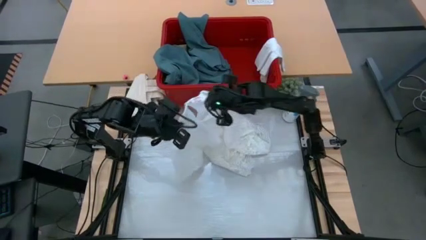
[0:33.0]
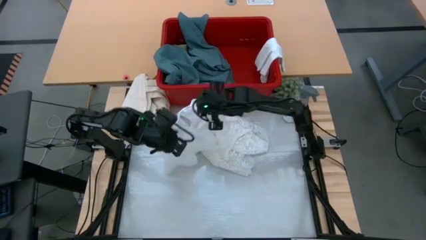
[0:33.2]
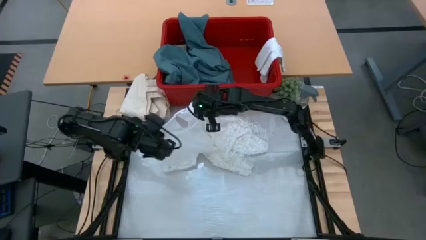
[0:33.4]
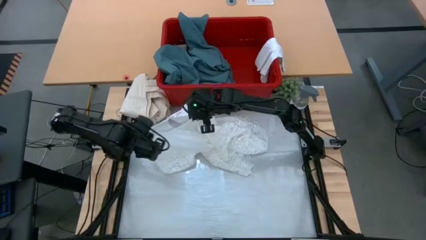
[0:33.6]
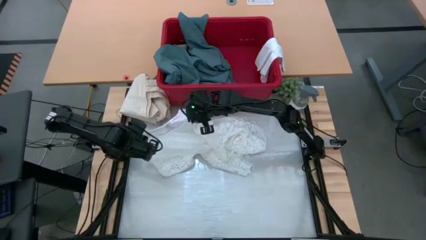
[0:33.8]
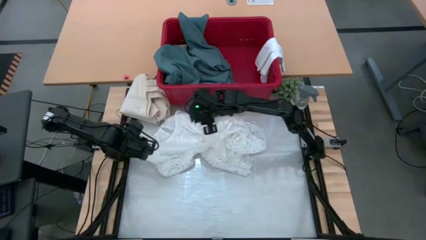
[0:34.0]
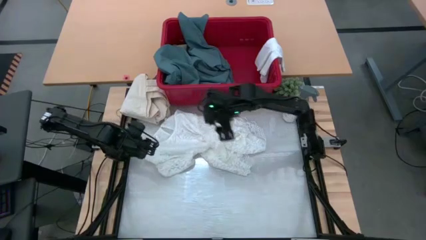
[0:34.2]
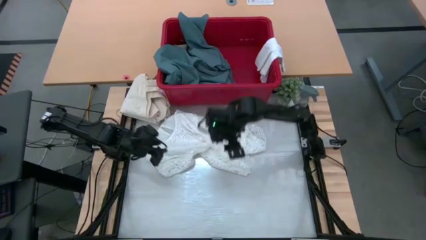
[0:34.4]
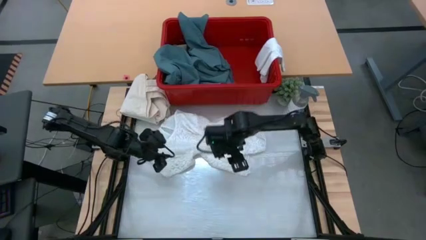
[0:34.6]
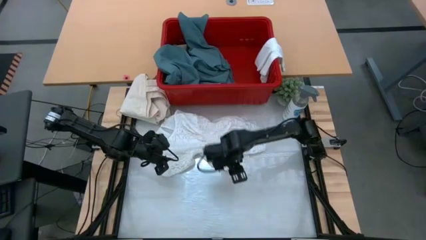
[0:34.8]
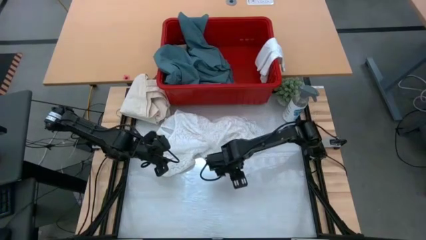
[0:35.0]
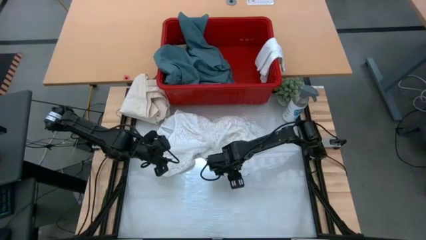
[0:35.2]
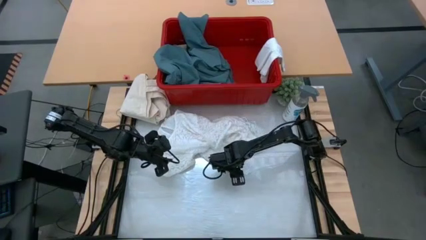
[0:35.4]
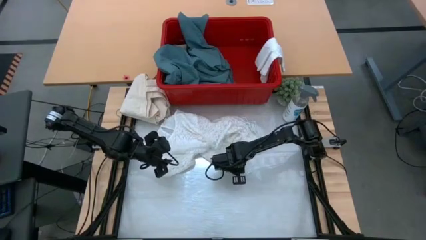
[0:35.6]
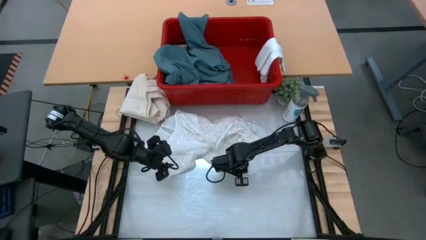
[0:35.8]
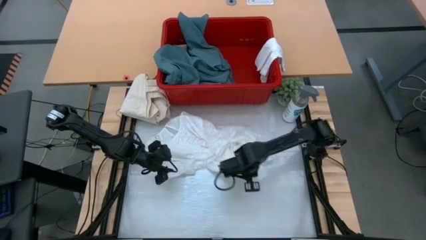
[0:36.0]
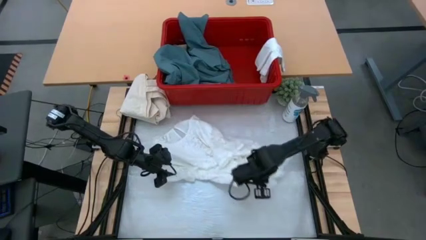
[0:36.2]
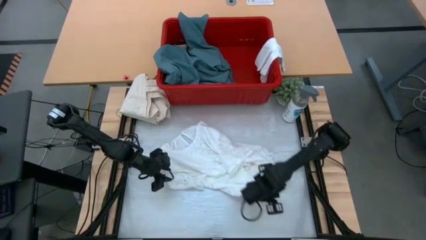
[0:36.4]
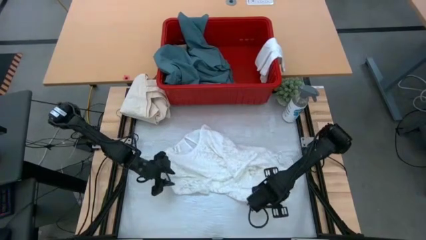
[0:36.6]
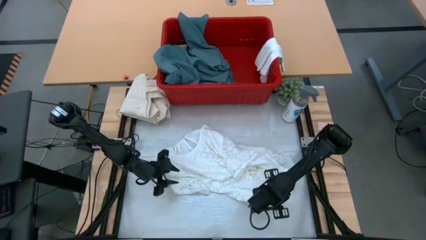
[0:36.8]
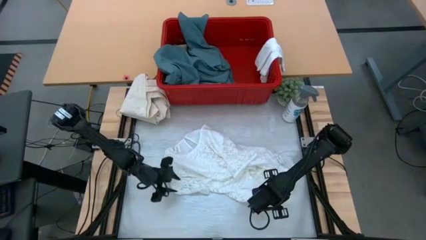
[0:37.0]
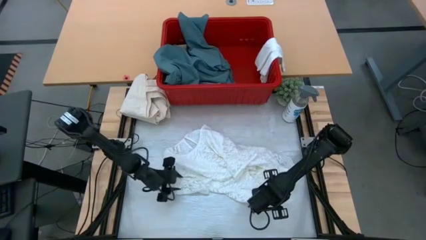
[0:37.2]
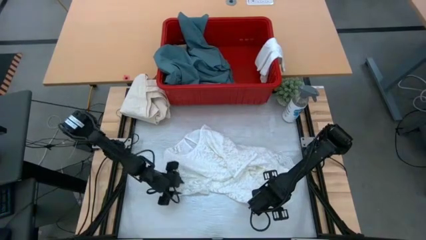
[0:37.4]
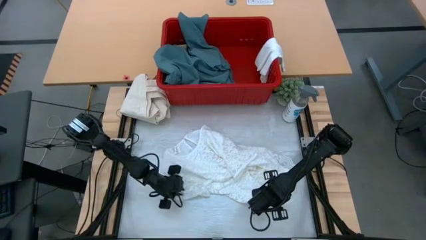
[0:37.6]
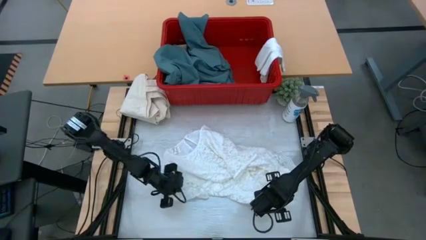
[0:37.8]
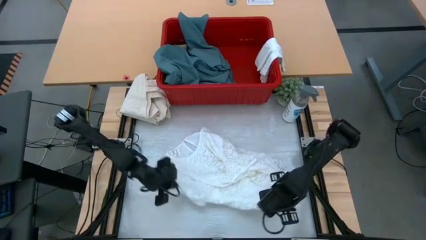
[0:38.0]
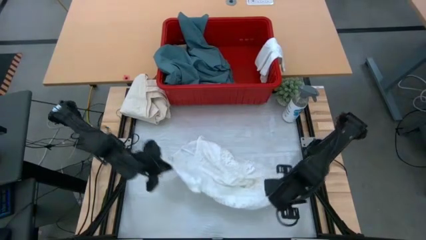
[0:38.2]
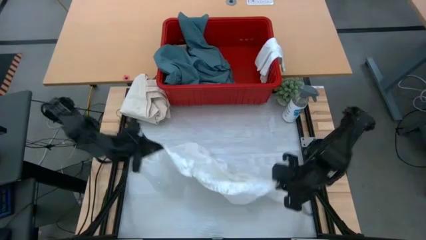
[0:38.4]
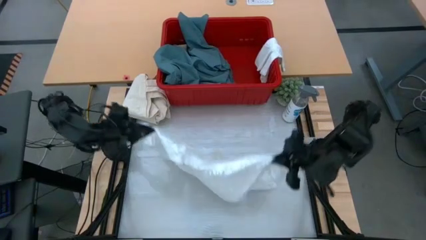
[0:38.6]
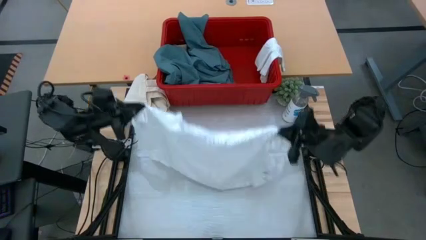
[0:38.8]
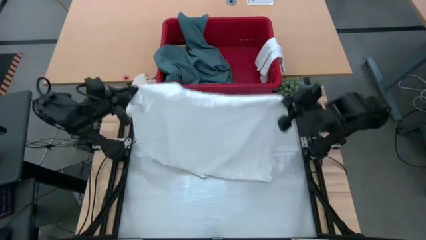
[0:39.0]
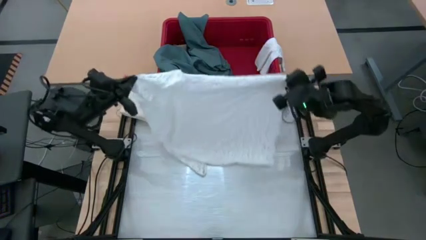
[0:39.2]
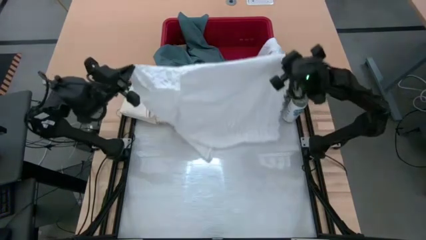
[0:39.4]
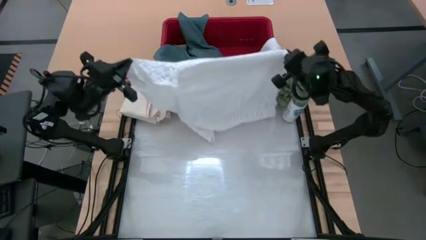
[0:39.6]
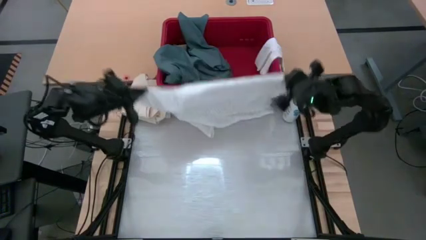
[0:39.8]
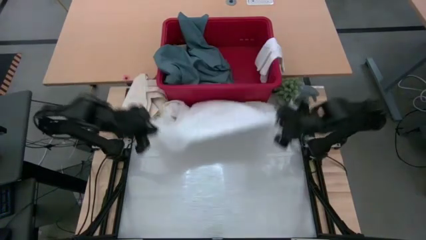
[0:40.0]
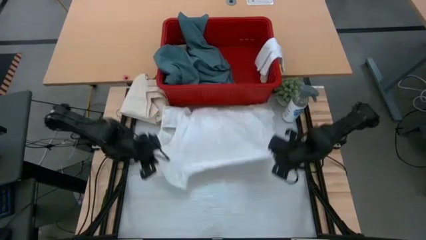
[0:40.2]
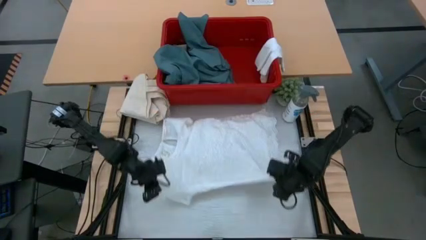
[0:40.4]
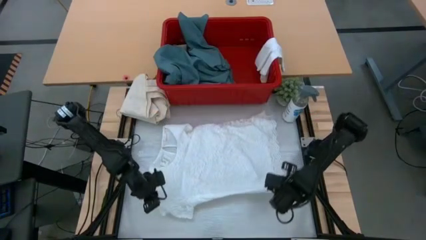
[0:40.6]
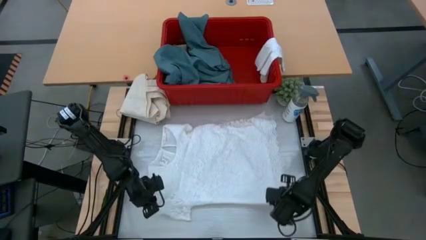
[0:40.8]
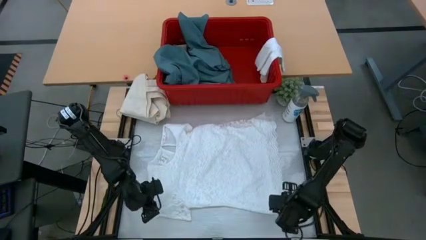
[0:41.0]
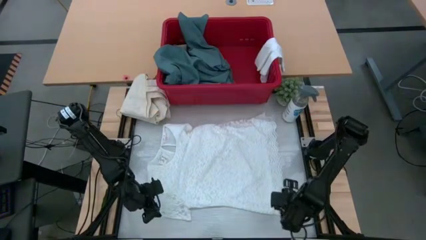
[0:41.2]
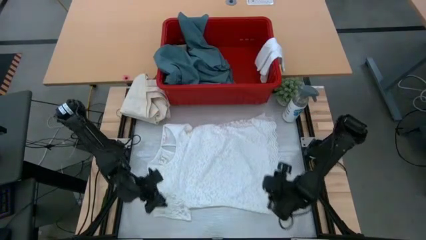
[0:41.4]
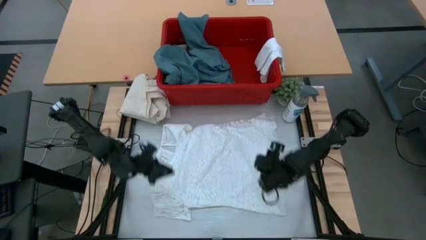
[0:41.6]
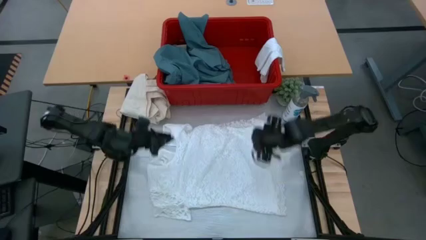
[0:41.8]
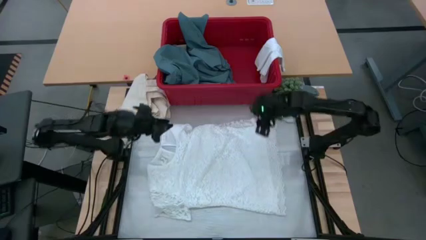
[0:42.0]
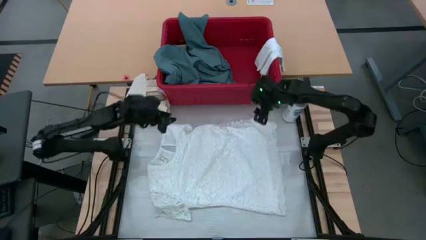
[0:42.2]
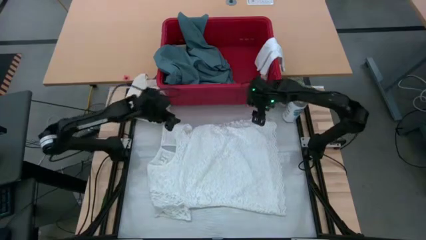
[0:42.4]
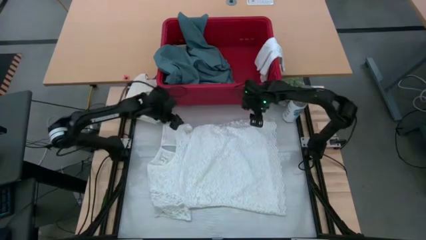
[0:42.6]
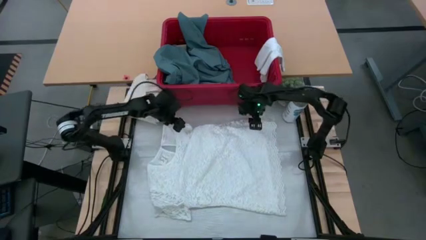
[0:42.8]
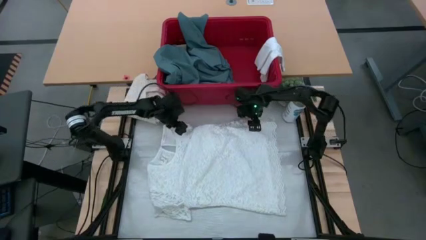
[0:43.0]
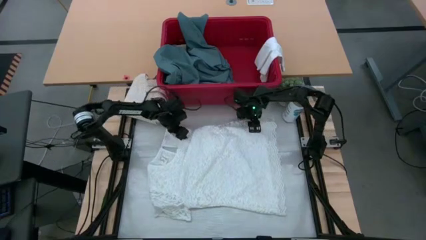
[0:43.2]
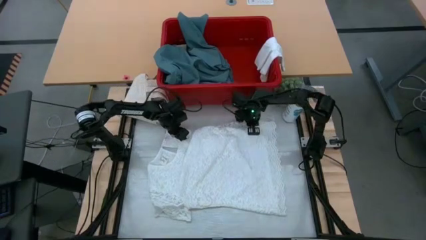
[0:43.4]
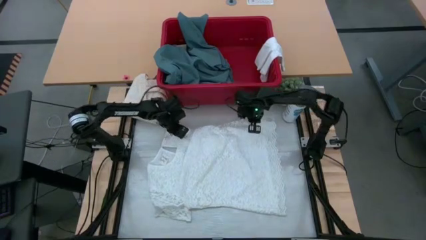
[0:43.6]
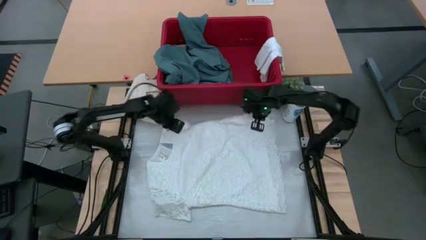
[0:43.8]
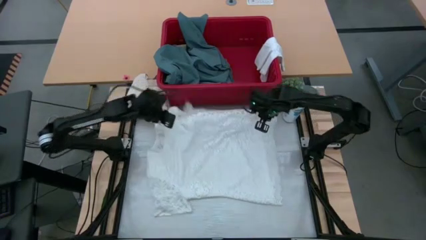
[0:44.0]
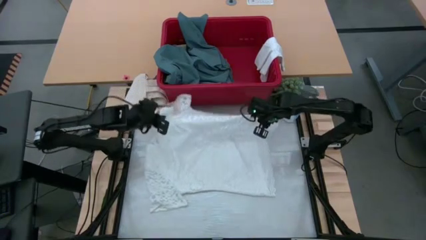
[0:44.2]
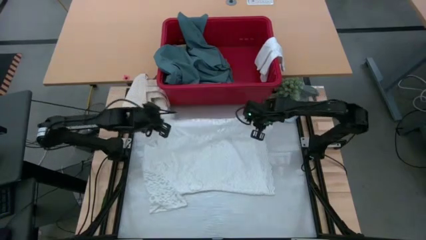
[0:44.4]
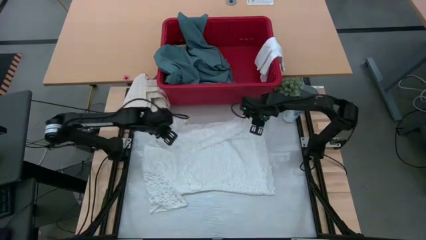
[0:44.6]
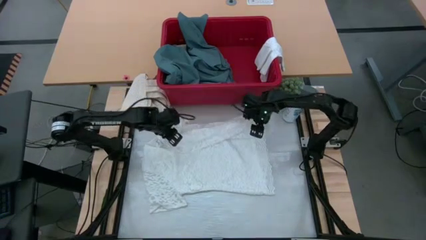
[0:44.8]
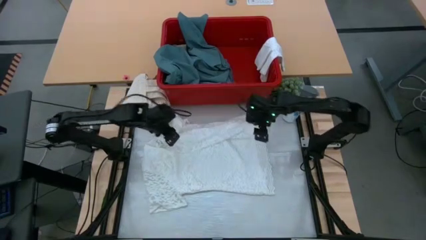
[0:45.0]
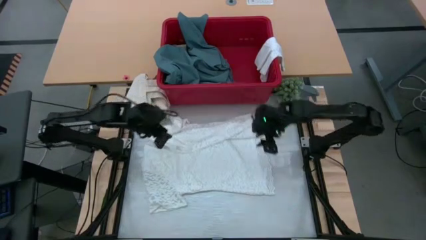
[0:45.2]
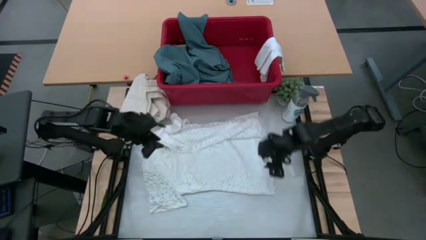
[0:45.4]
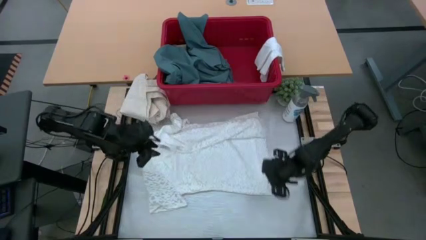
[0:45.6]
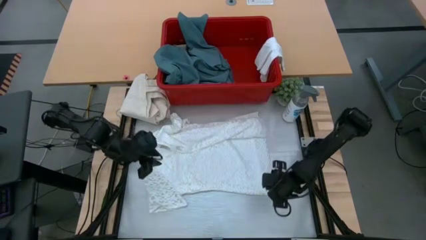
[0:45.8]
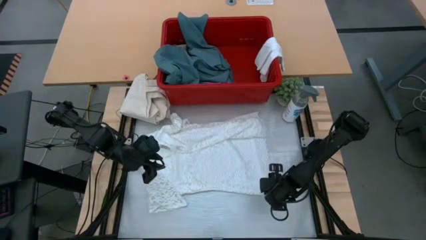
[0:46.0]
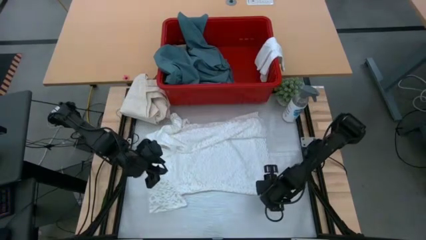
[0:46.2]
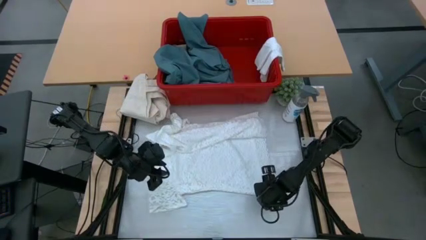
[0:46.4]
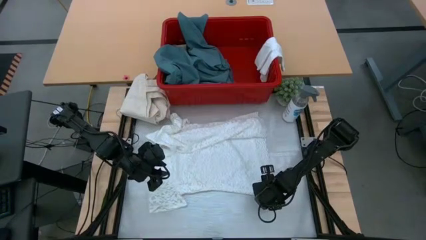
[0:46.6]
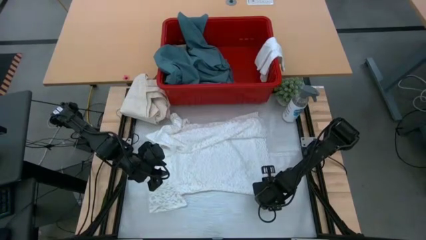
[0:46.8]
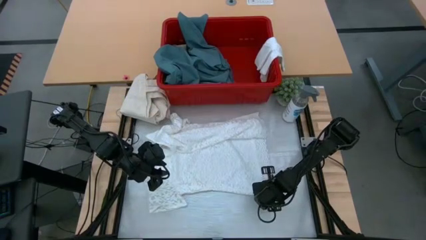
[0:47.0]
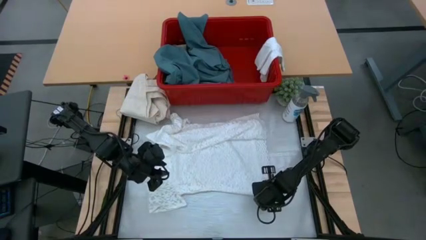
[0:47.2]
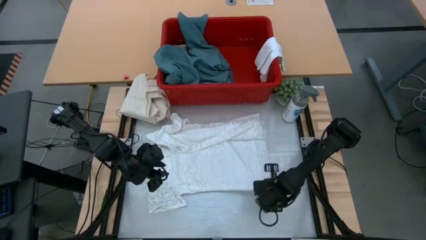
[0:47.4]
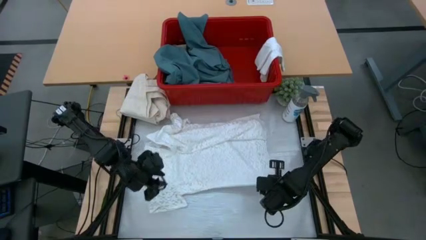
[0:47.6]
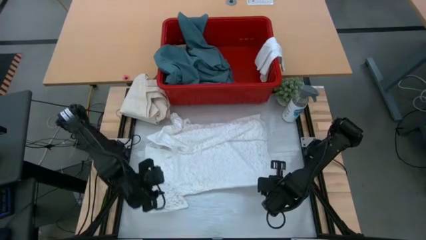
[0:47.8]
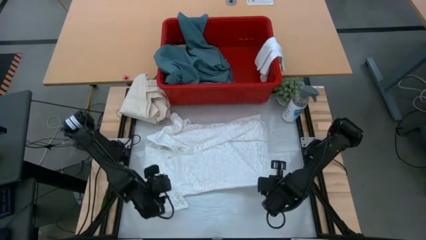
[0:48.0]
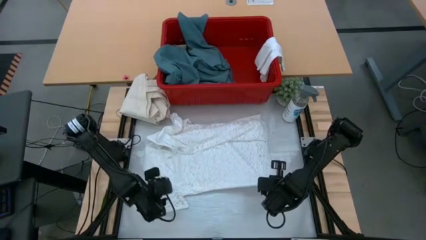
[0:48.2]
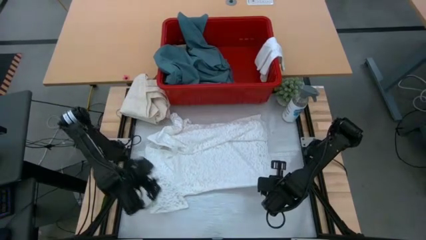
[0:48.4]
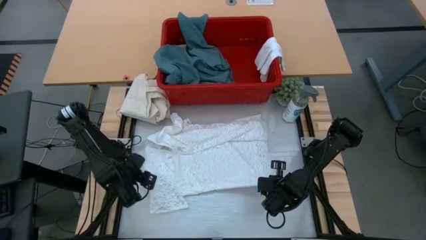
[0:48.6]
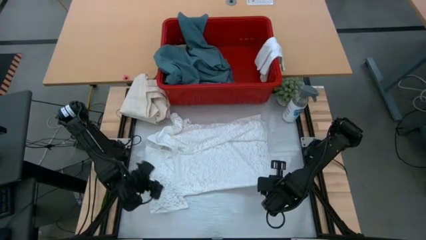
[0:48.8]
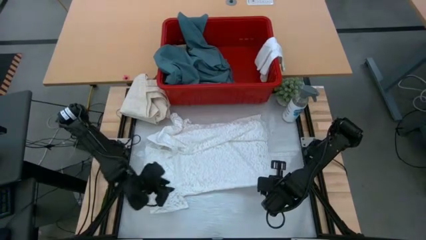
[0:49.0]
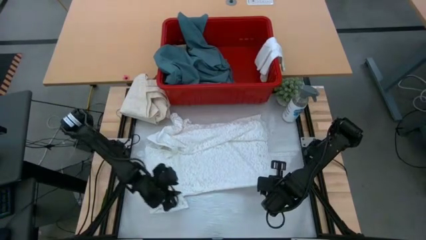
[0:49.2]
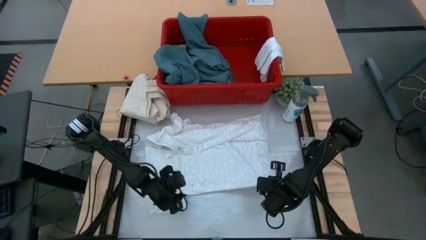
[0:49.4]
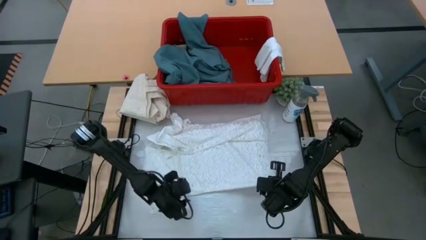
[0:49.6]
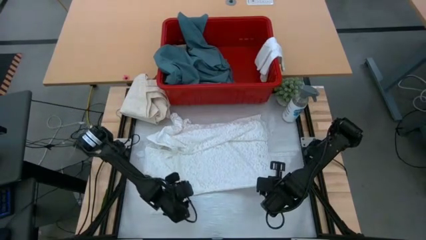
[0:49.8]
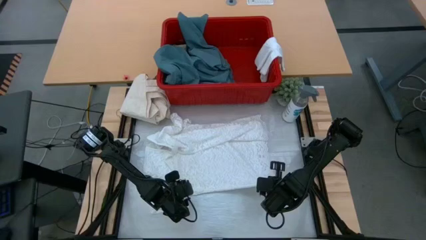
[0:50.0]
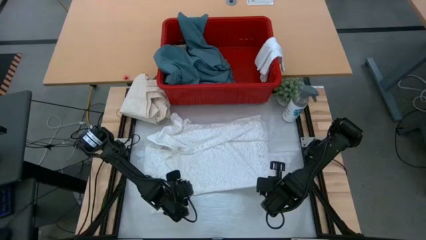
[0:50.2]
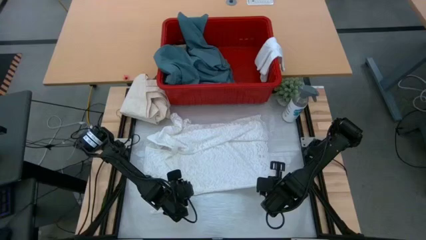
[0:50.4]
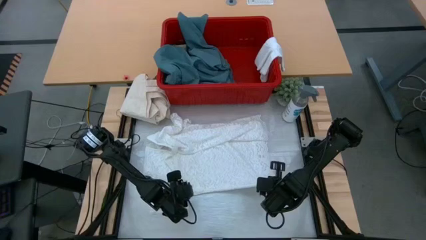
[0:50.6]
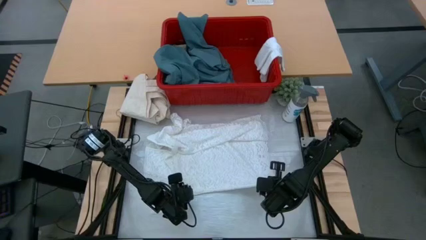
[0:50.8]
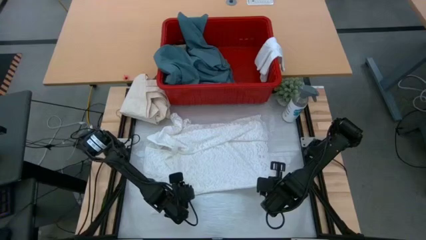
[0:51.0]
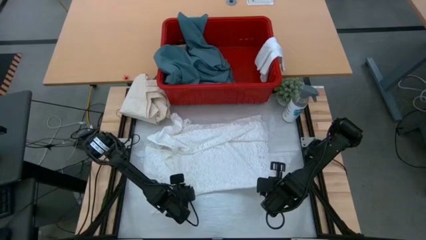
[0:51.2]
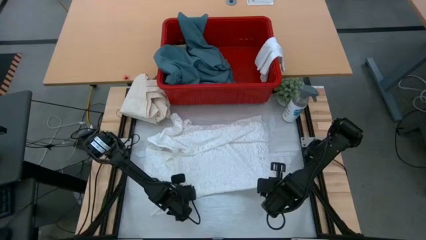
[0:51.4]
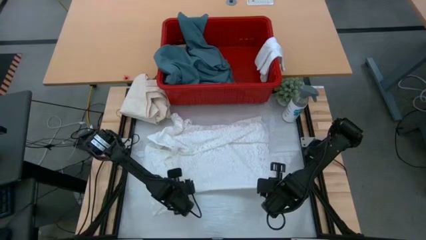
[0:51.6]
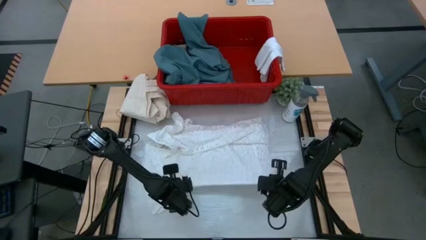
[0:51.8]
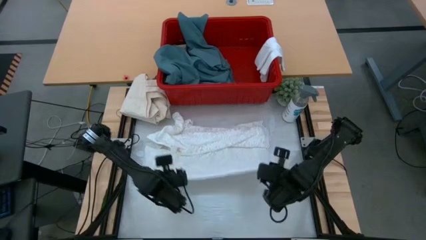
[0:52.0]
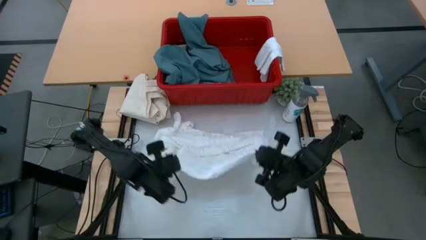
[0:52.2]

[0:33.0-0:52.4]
Task: Fold Laundry from Bin
Fold the white shirt
